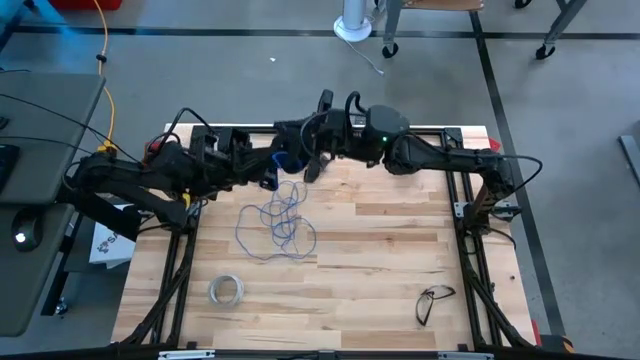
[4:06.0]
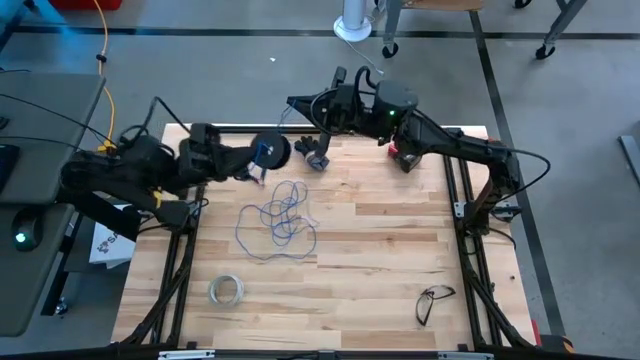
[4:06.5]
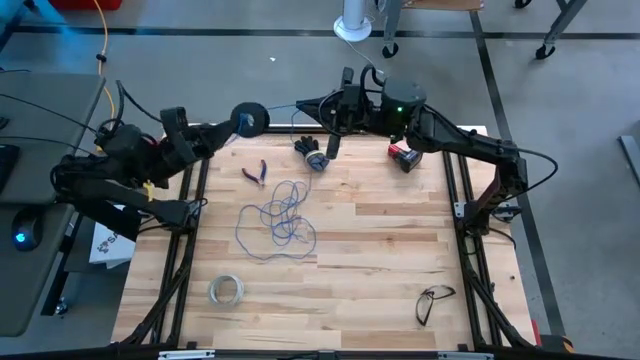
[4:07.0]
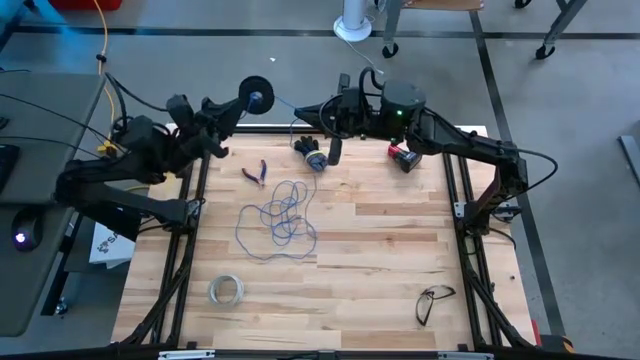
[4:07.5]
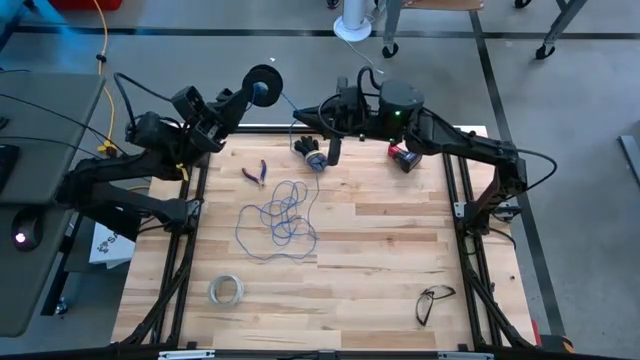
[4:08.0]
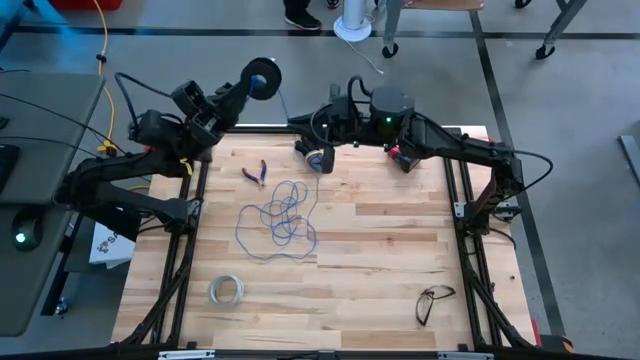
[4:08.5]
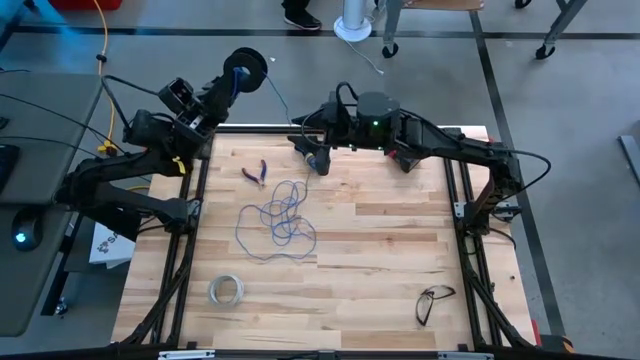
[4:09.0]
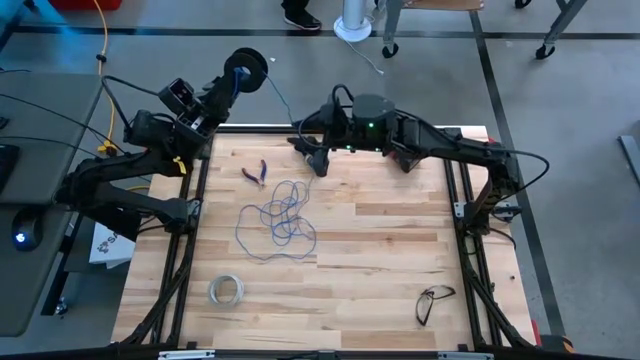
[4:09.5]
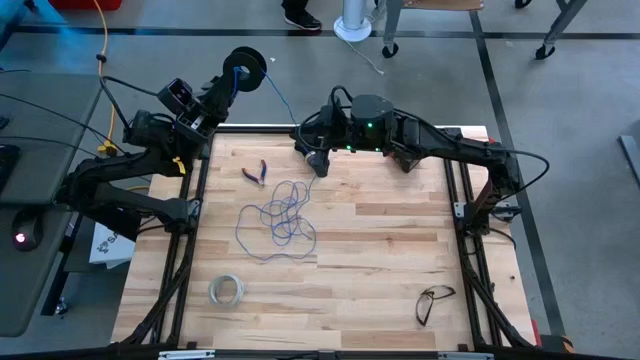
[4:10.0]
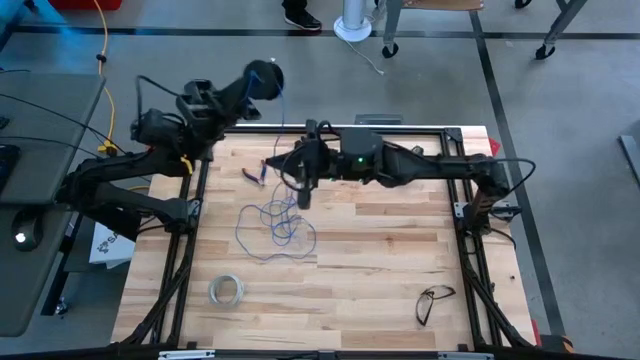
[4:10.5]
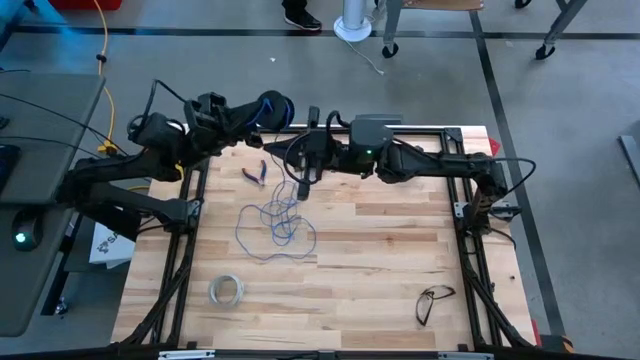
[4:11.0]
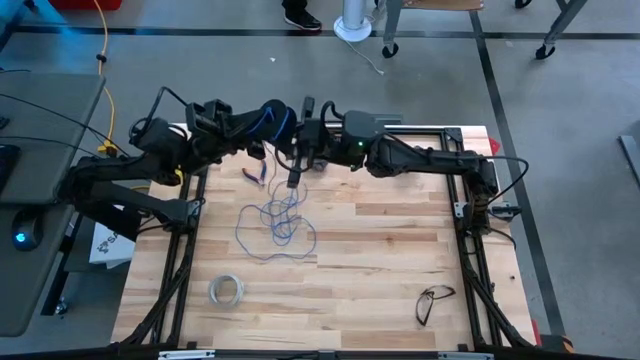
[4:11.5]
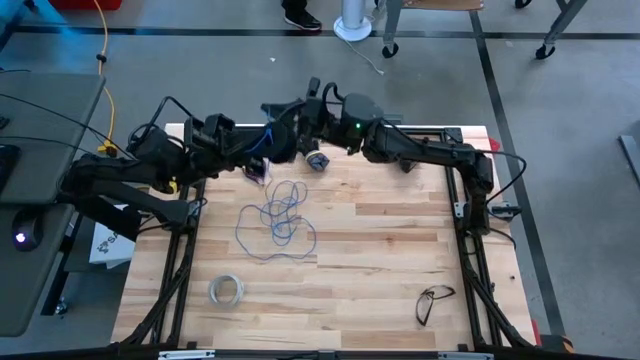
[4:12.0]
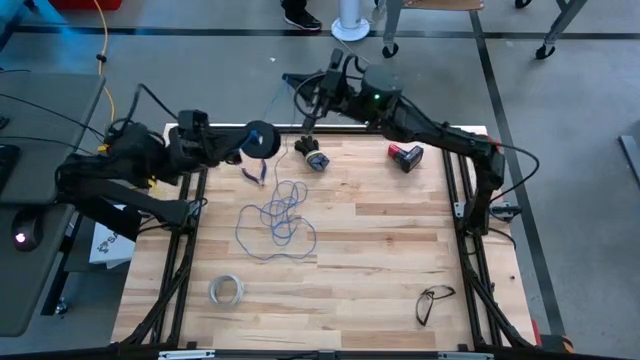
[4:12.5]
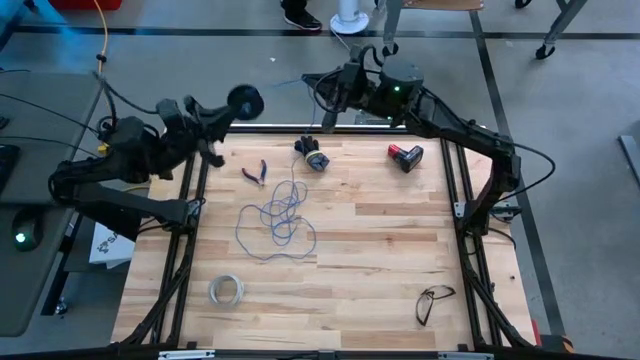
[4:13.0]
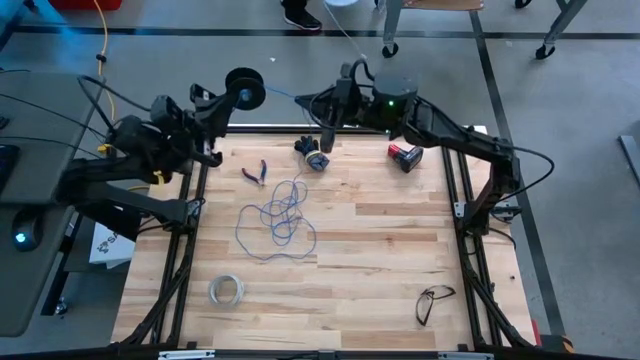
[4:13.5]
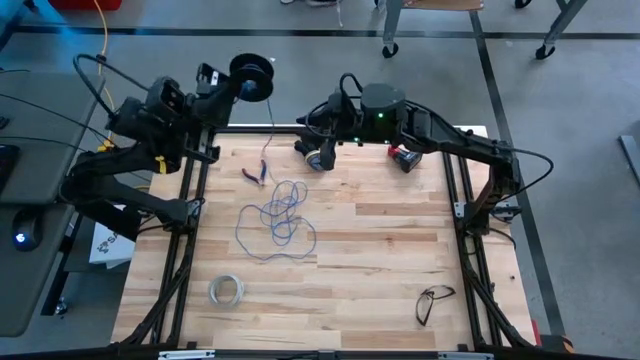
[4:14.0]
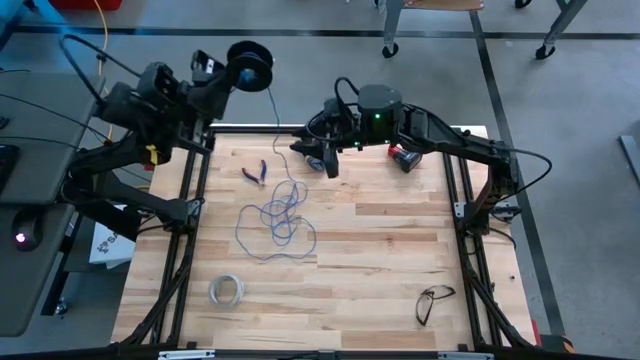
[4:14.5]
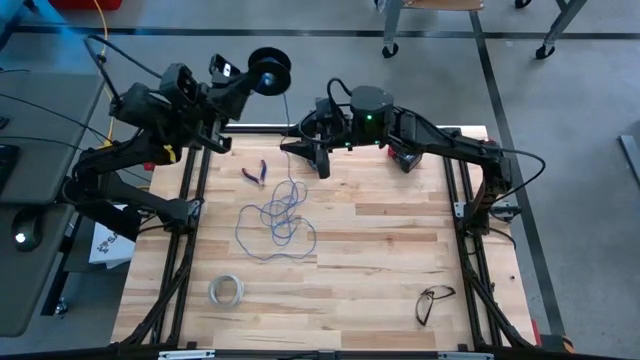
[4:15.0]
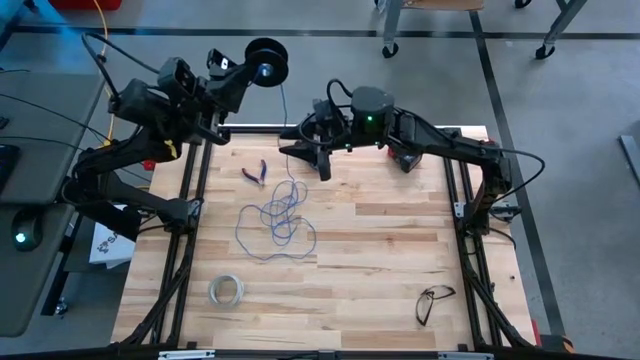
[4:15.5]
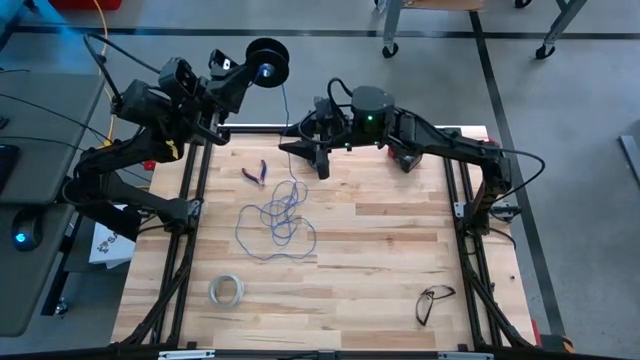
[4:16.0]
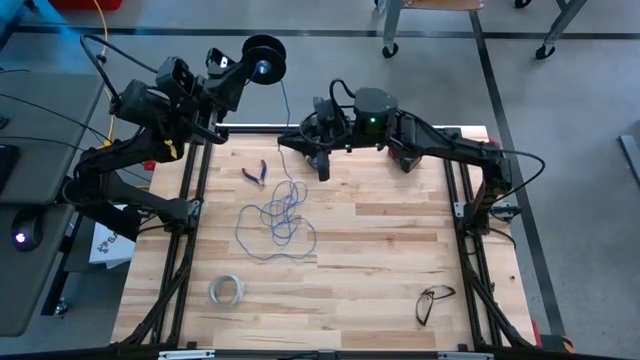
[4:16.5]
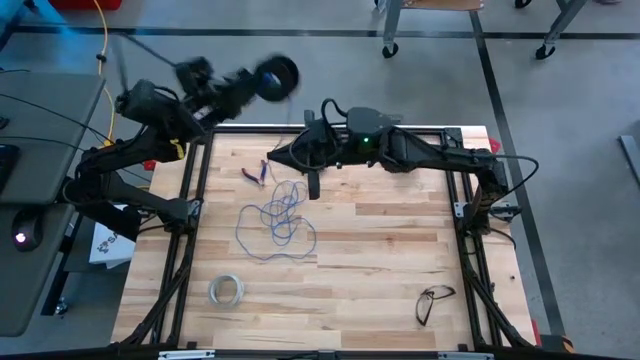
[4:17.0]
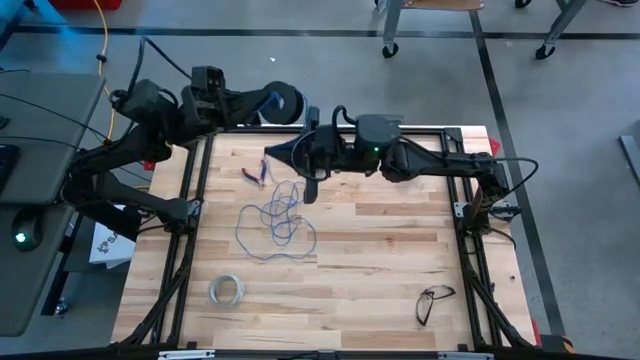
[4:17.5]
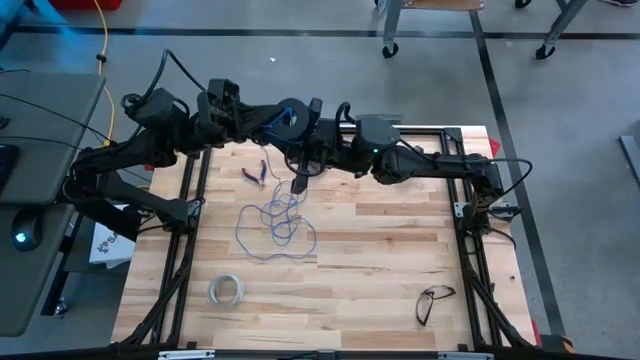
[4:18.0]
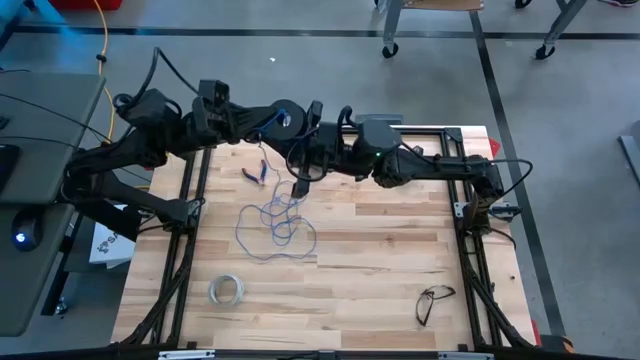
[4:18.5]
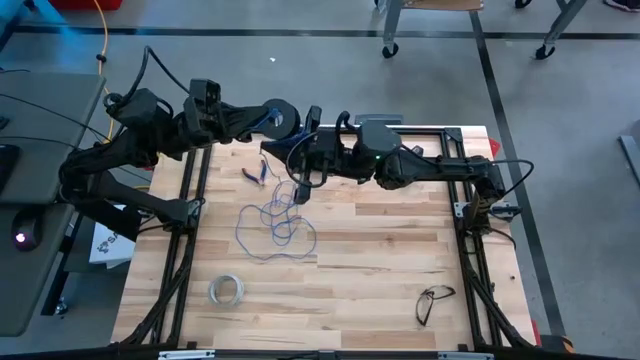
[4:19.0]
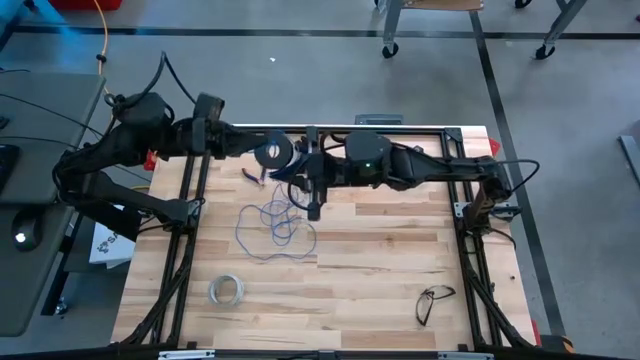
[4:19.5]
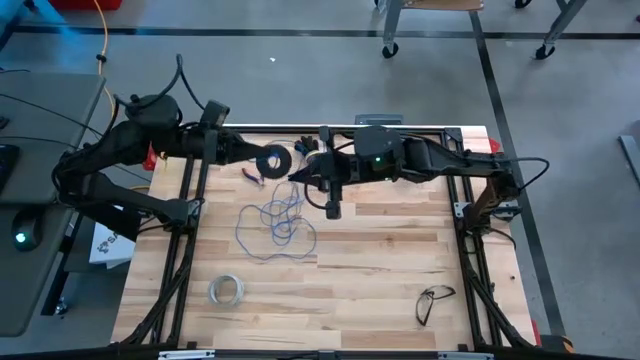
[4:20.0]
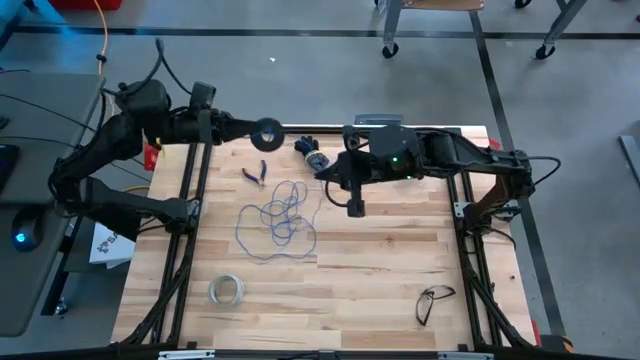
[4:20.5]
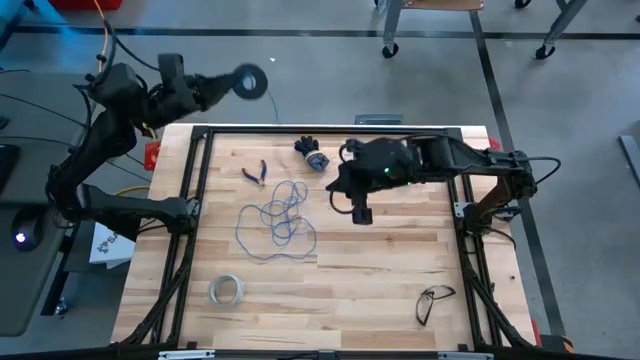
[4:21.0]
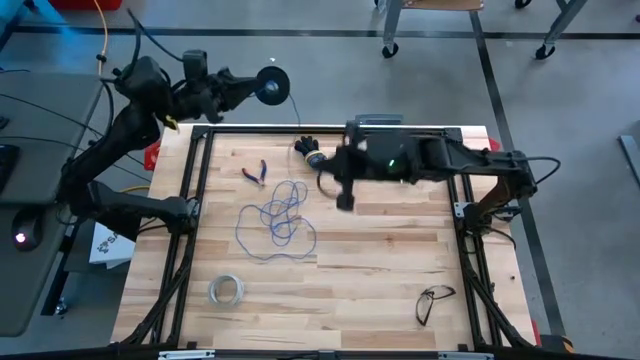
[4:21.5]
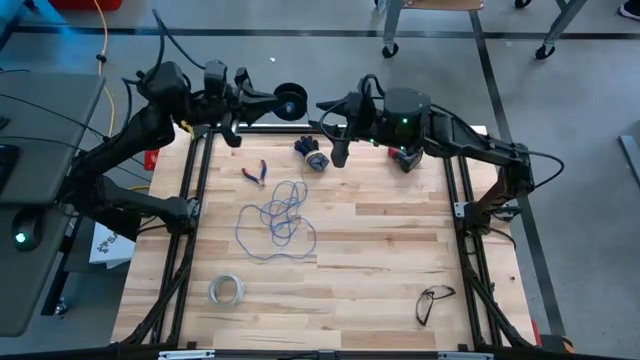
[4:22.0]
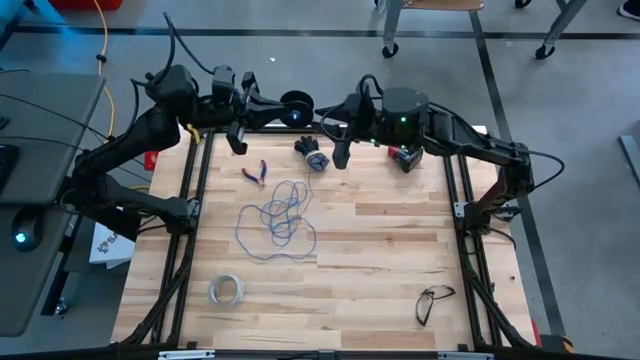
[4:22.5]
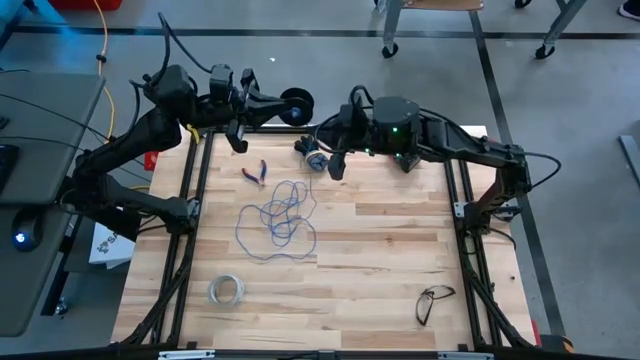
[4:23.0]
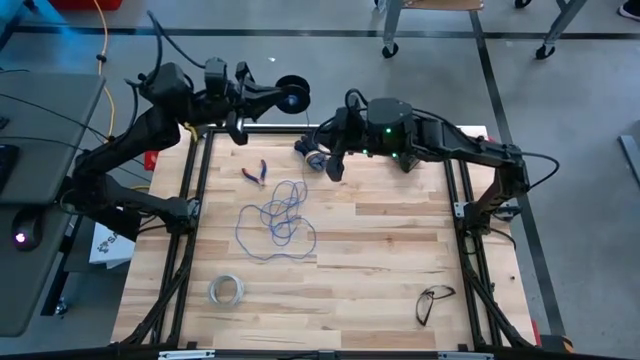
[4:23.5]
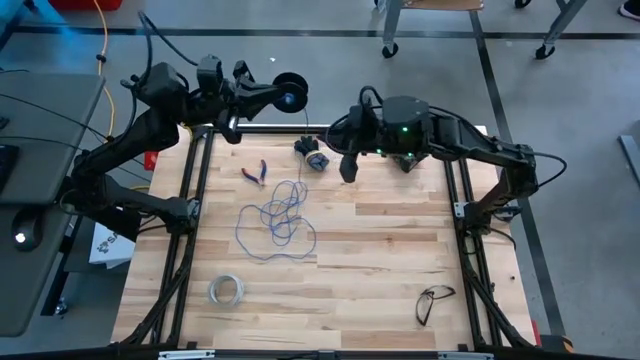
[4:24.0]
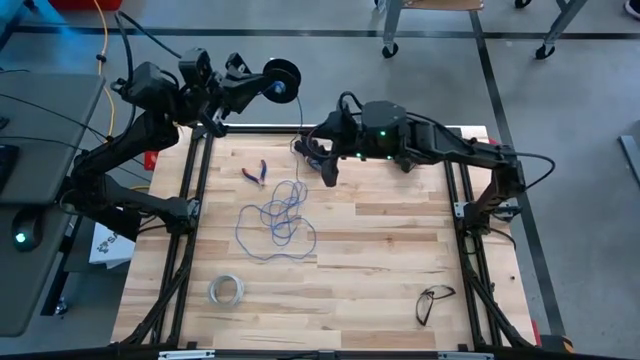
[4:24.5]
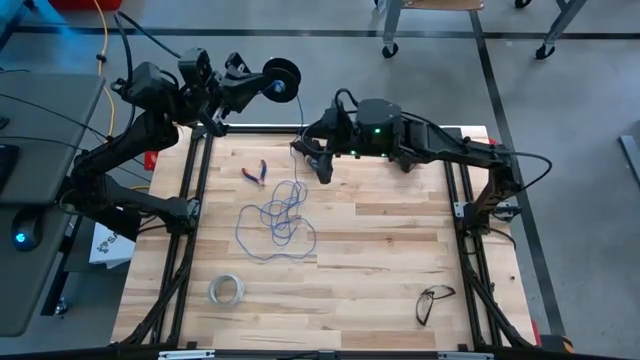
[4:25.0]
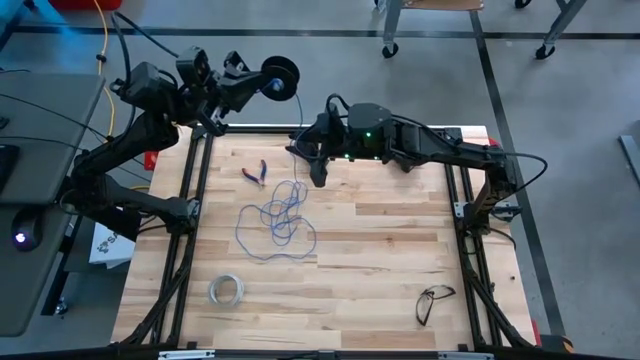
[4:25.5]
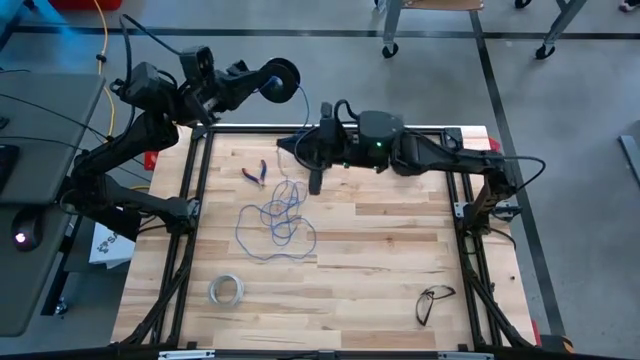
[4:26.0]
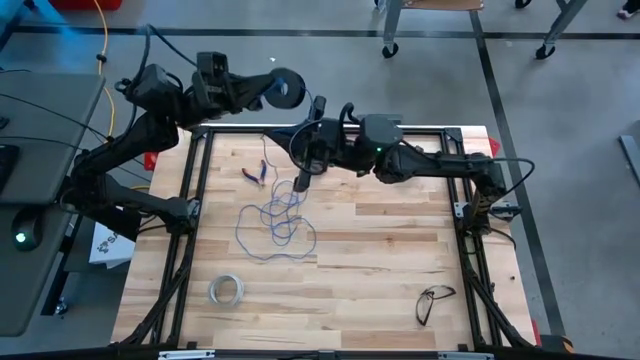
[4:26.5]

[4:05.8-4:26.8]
Task: Coil cords
Coil the blue wire onto the black spool
